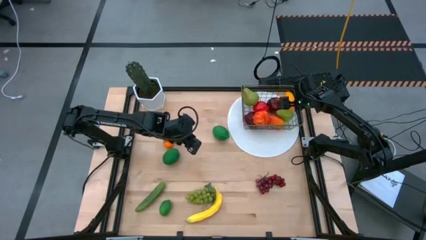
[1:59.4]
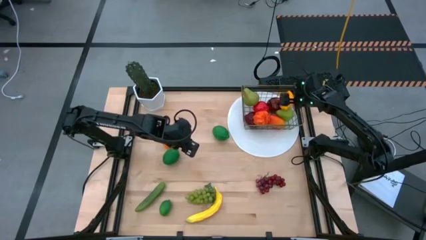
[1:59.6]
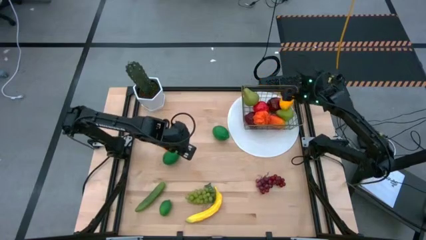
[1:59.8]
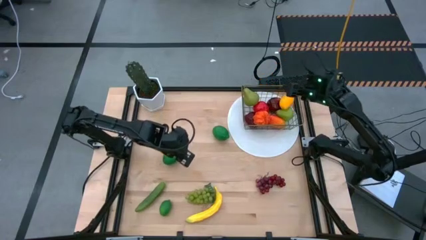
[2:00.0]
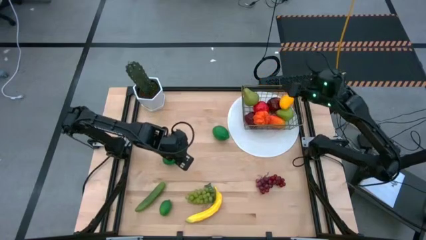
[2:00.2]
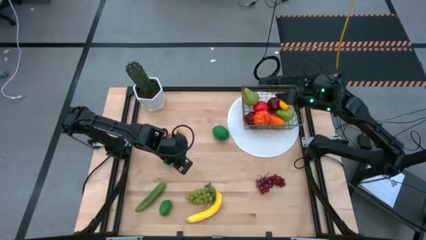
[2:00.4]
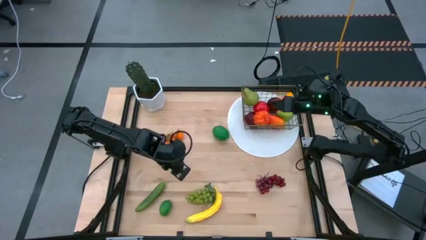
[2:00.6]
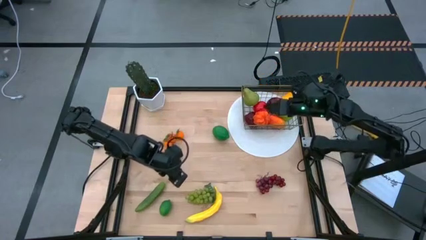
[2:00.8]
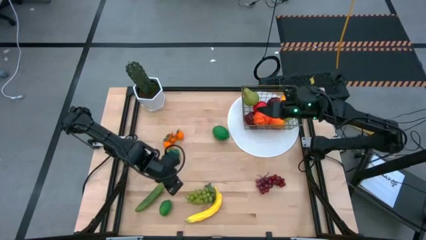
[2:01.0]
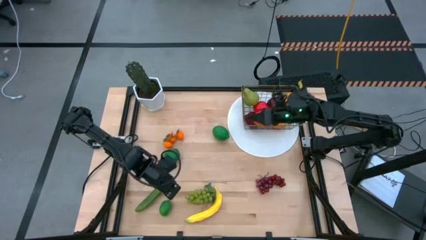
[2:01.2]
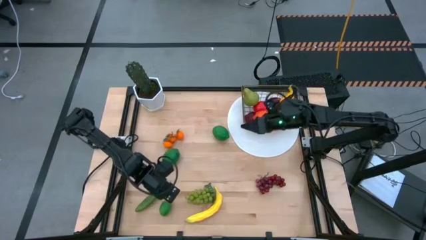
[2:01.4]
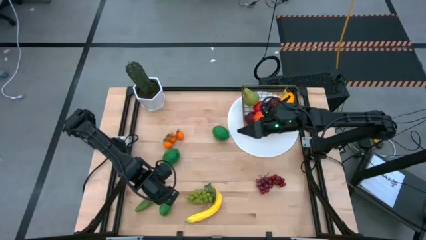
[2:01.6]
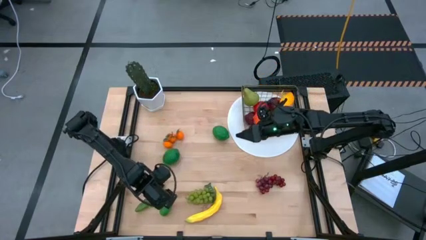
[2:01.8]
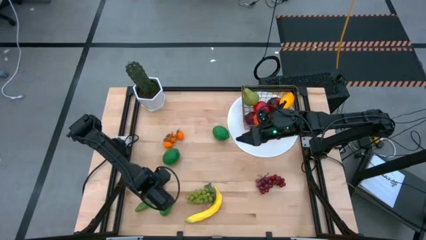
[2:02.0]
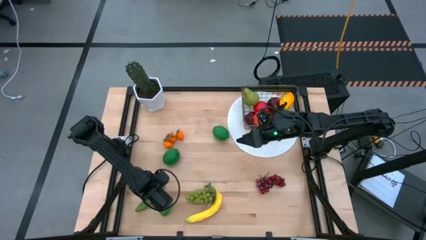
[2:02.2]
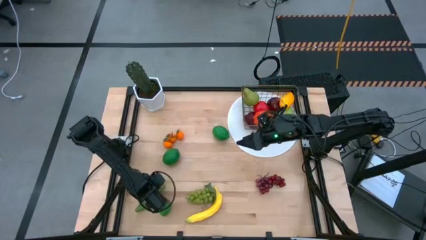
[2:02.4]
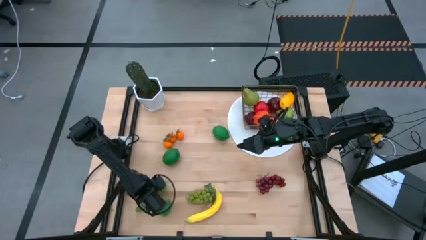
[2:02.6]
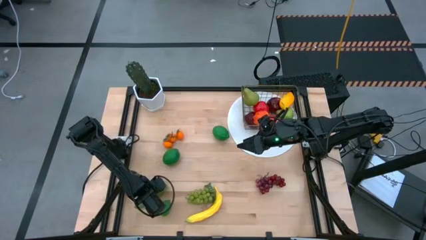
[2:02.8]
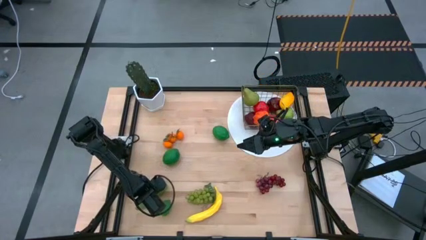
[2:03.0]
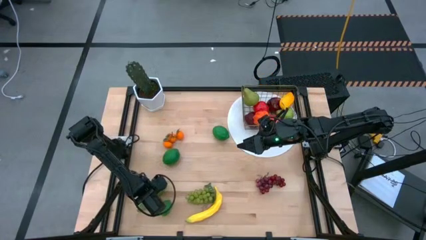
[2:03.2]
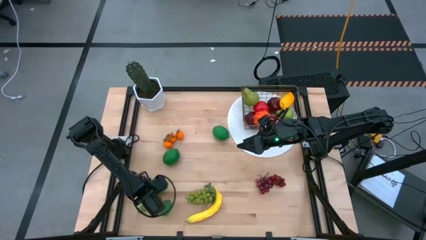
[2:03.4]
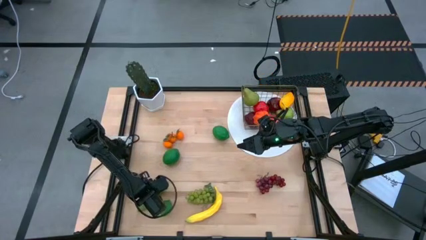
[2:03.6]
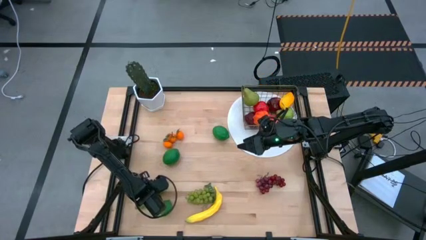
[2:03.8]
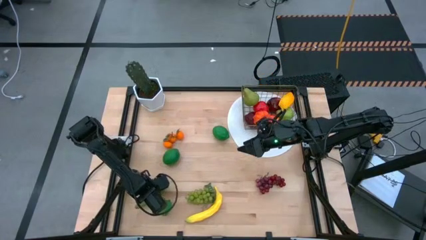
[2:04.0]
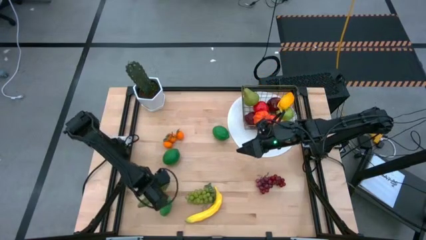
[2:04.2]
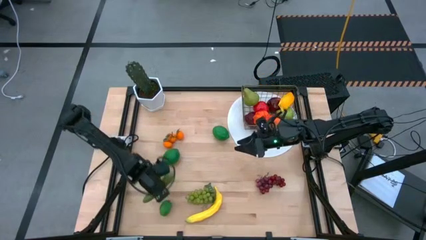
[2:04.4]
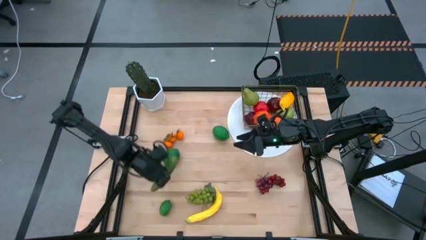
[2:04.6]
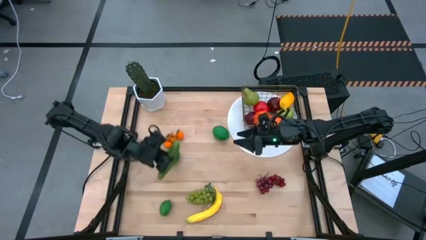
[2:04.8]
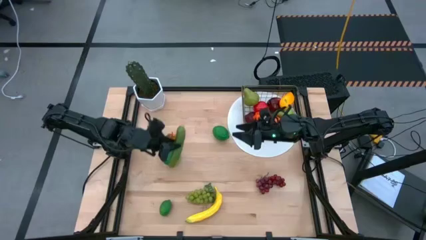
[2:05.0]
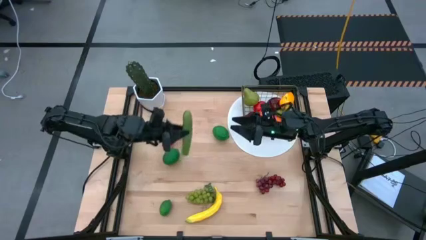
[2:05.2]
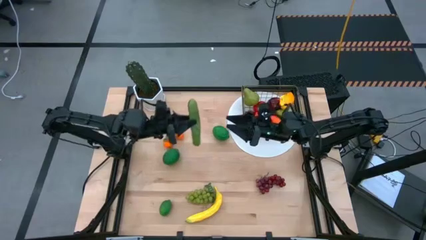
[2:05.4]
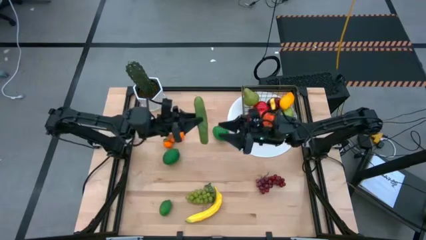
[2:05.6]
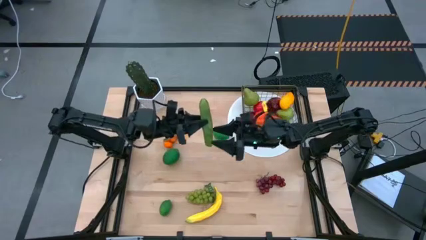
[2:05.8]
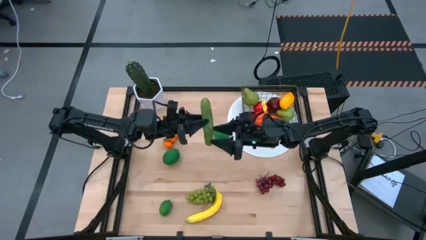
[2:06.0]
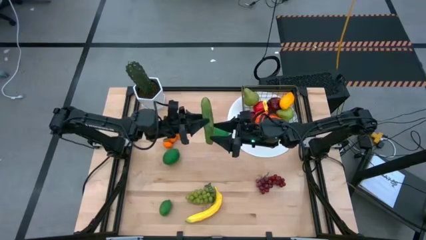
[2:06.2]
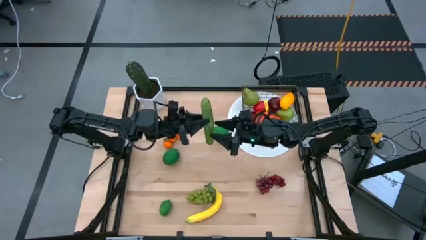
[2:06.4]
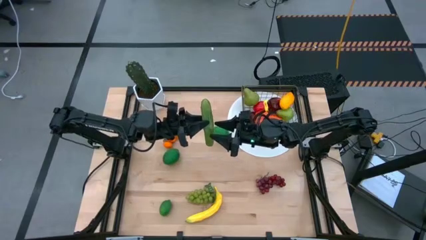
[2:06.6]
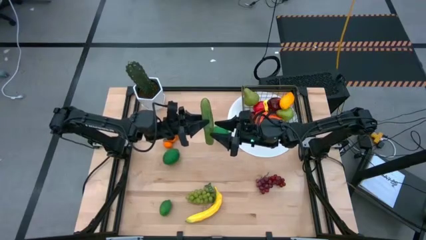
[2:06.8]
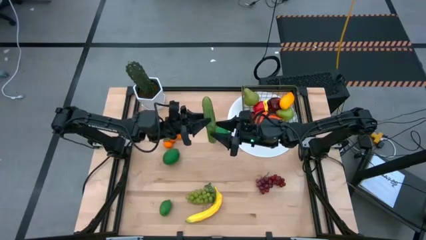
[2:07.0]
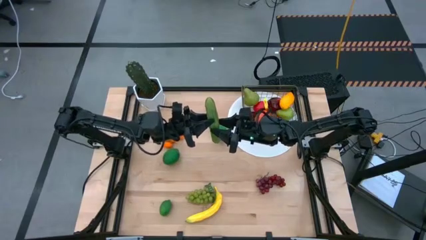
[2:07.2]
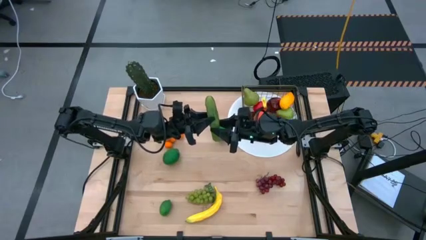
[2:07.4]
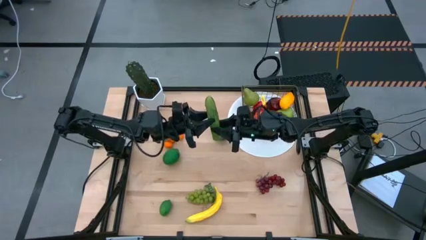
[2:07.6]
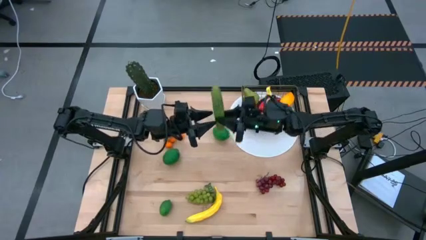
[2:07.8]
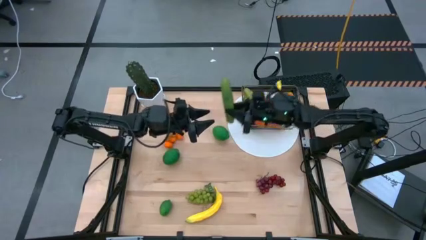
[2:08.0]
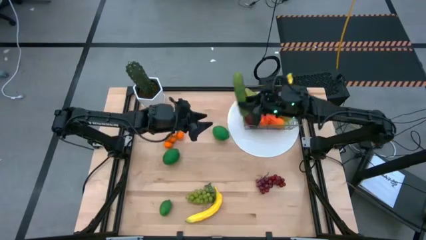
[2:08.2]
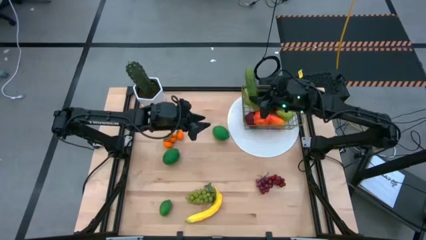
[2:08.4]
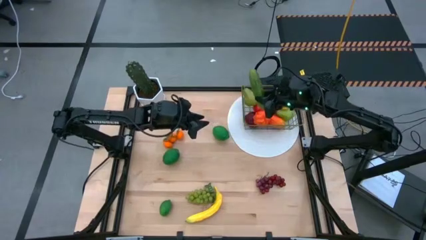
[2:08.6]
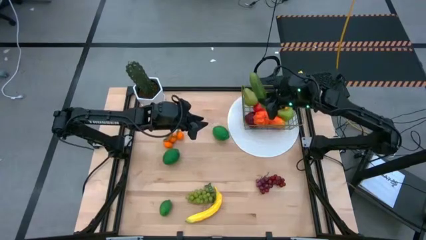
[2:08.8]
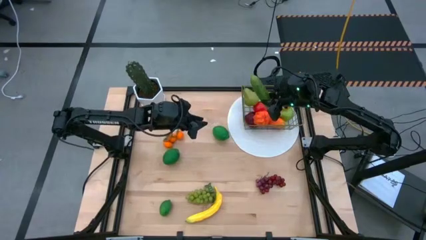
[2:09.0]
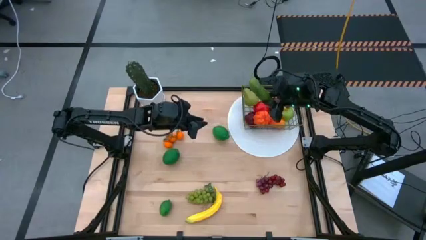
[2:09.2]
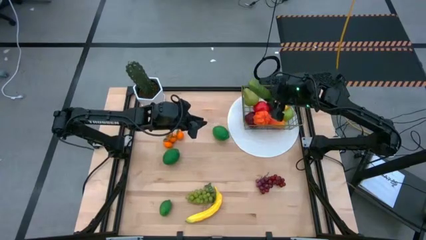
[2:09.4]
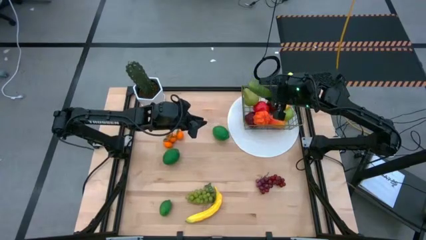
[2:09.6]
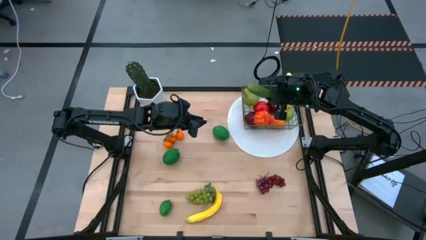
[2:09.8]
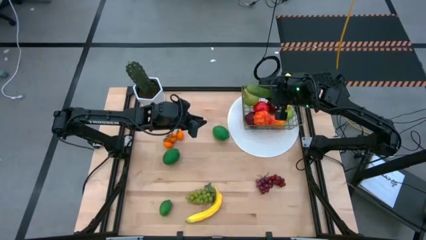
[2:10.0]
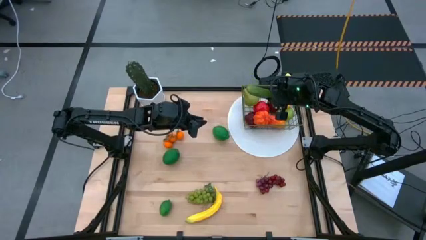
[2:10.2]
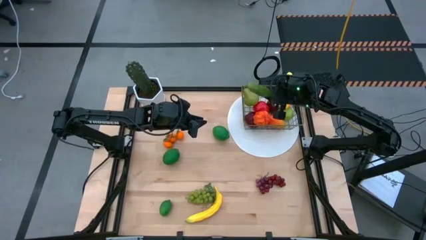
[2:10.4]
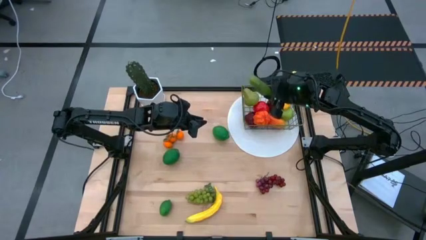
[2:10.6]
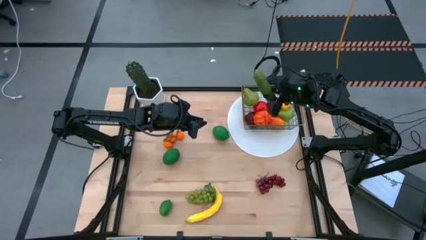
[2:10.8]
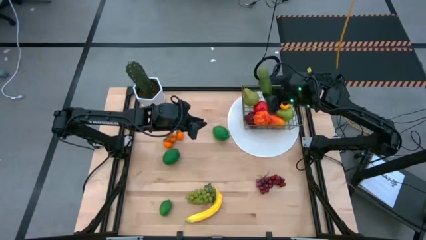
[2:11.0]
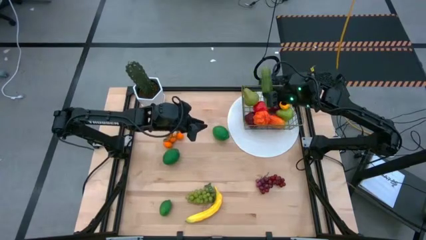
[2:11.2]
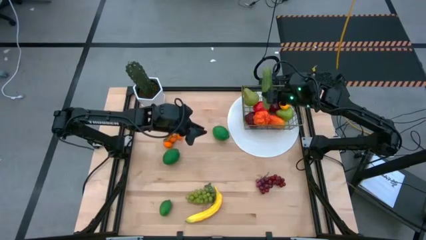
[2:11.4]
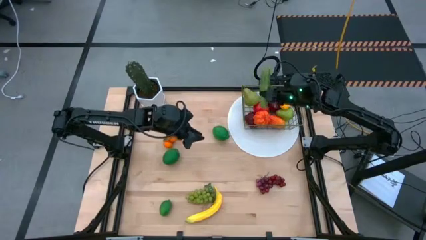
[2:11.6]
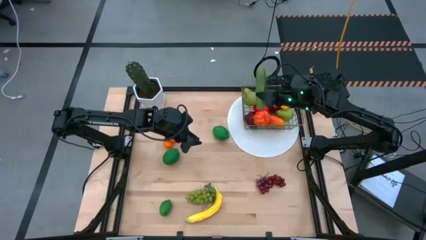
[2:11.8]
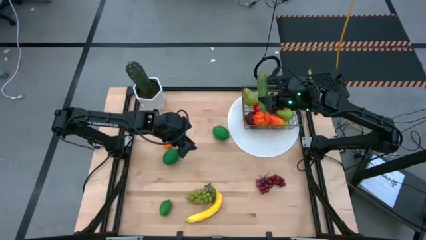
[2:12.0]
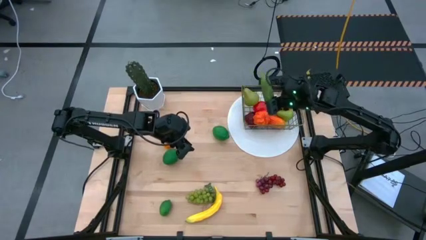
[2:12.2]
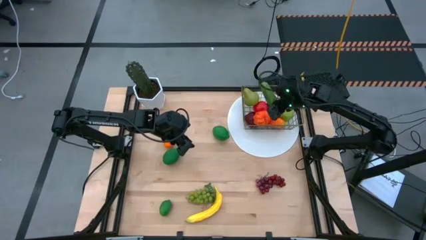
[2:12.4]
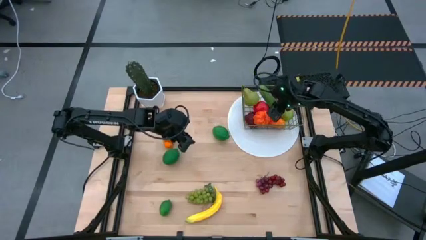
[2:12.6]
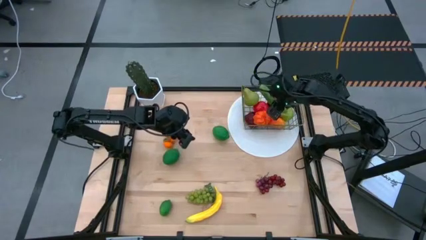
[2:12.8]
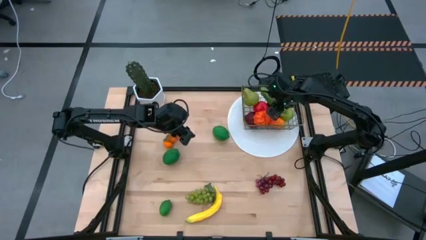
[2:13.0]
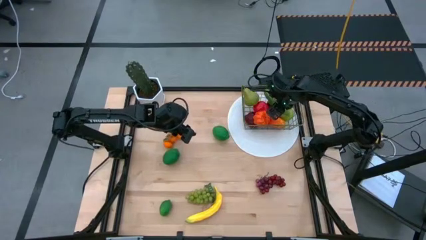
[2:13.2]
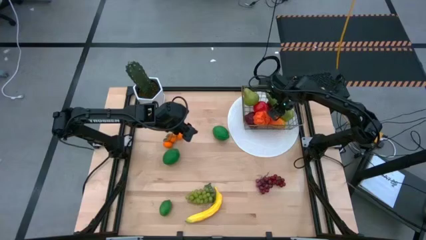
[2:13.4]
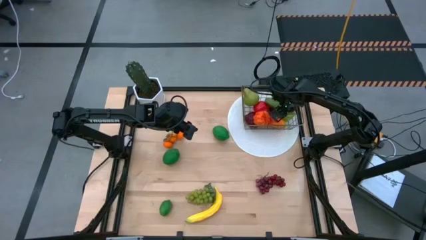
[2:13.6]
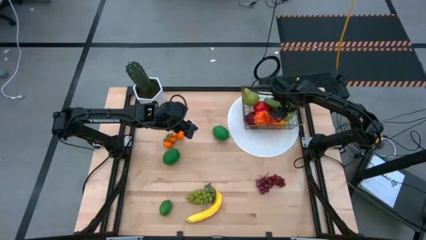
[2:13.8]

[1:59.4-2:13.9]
Task: Build produce basket
Put the green cucumber into the gold wire basket
